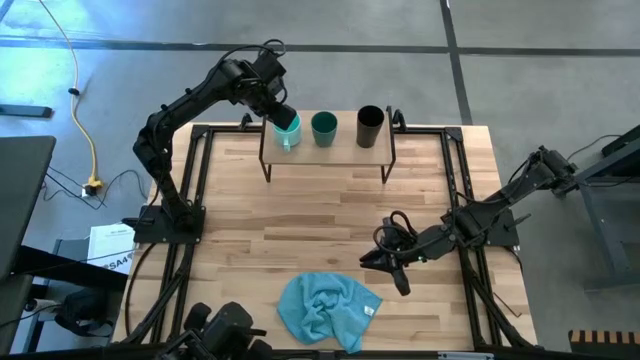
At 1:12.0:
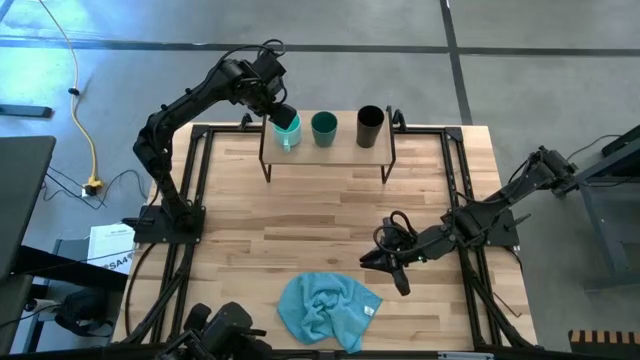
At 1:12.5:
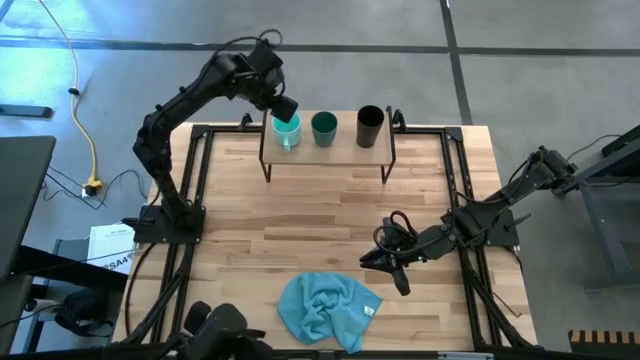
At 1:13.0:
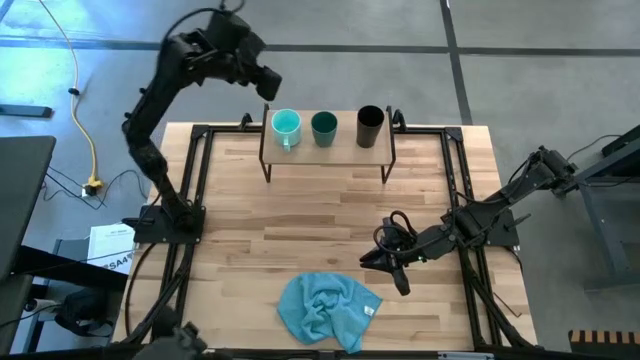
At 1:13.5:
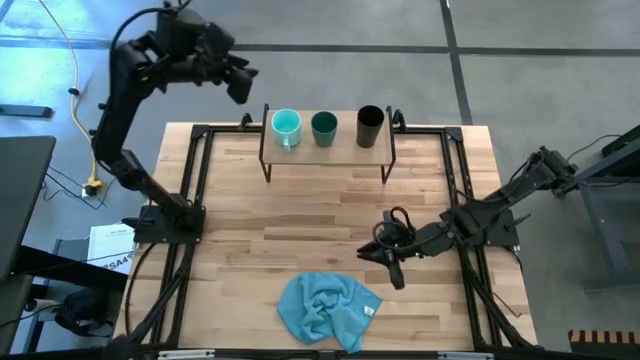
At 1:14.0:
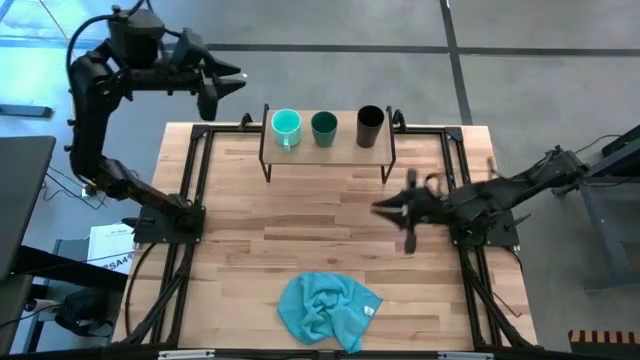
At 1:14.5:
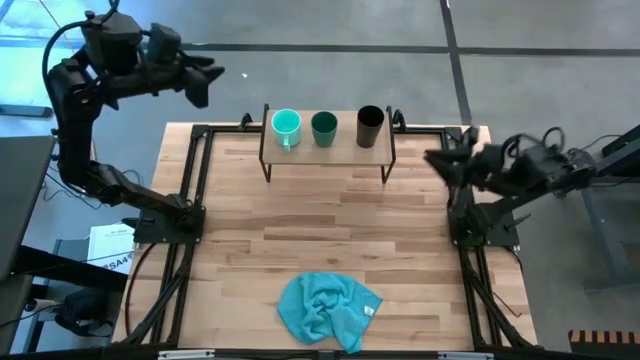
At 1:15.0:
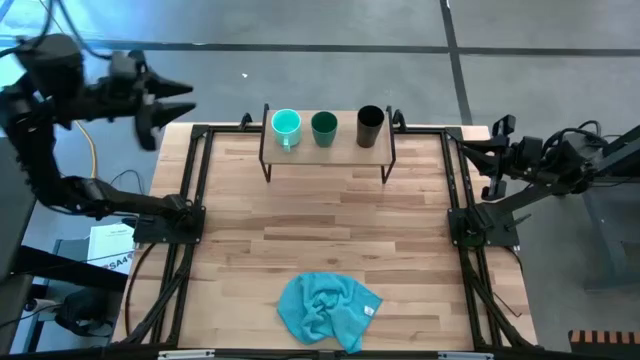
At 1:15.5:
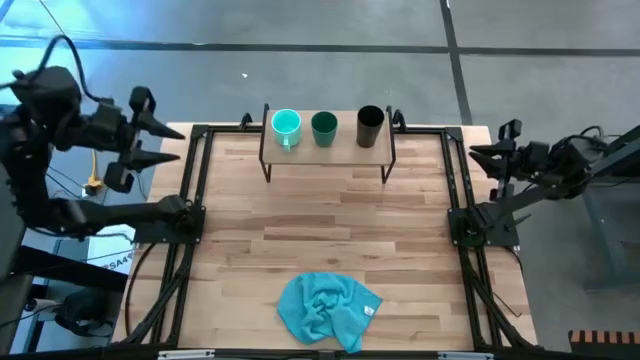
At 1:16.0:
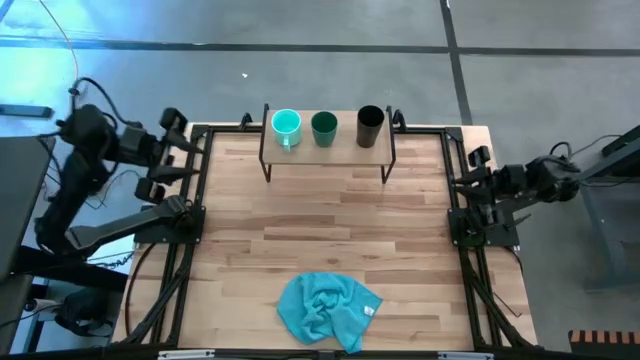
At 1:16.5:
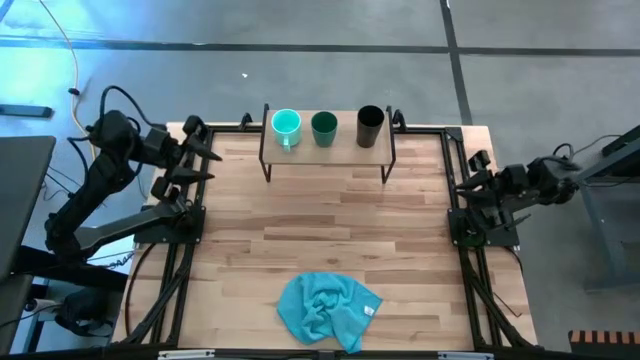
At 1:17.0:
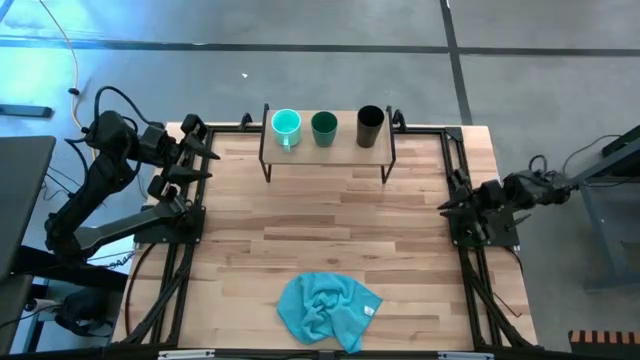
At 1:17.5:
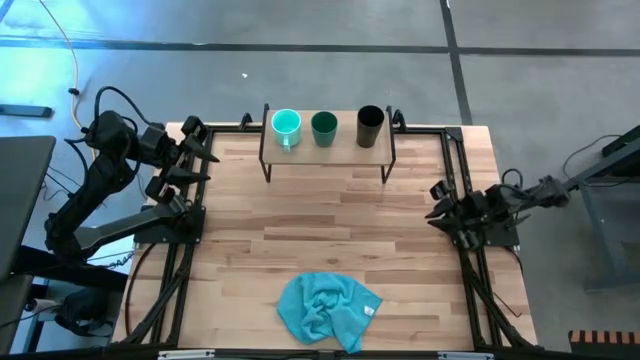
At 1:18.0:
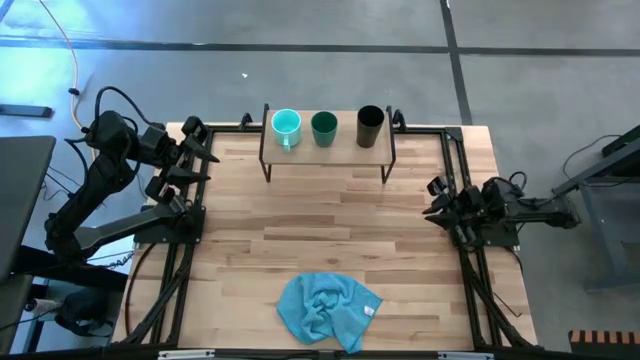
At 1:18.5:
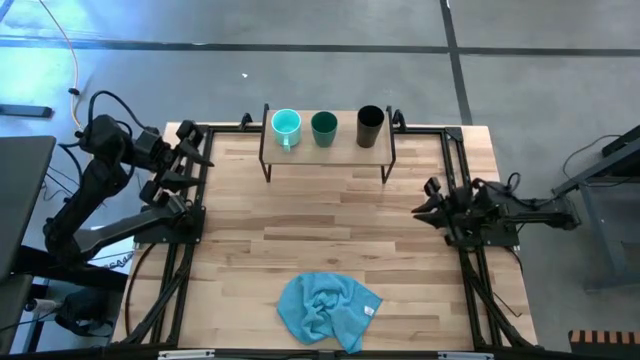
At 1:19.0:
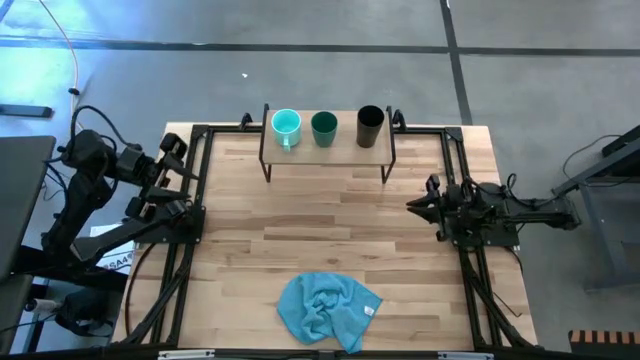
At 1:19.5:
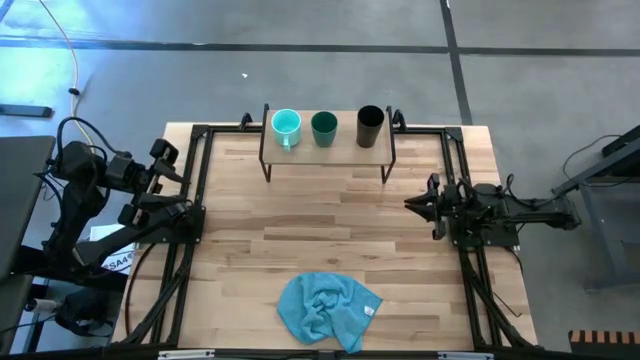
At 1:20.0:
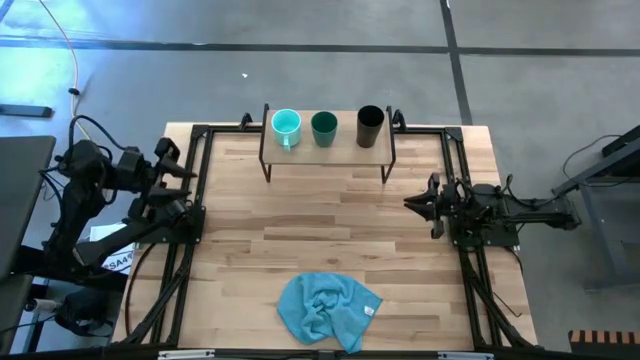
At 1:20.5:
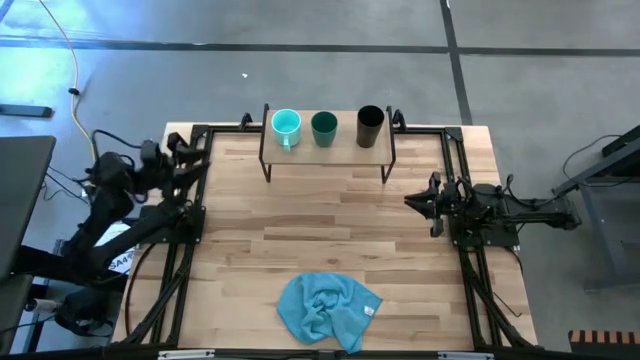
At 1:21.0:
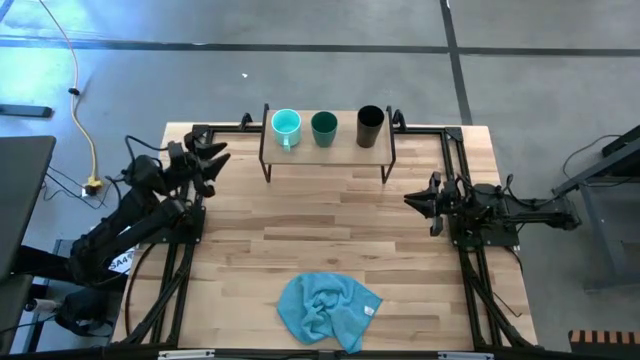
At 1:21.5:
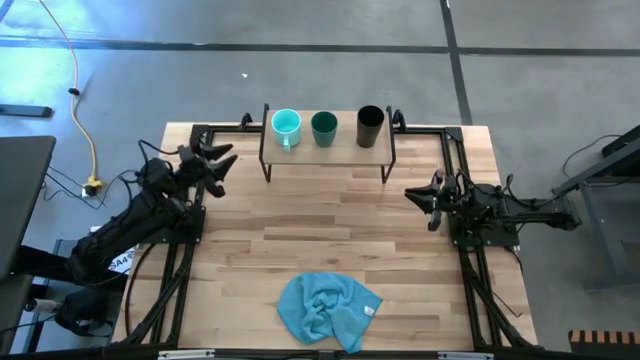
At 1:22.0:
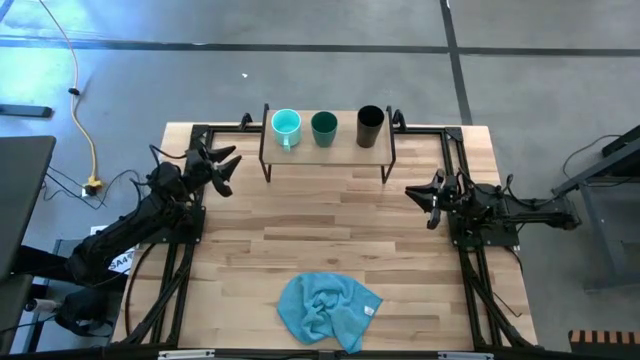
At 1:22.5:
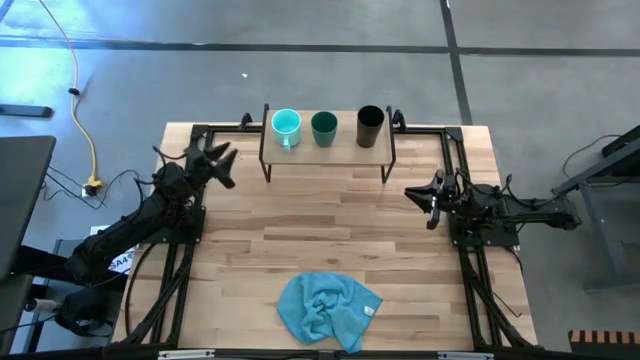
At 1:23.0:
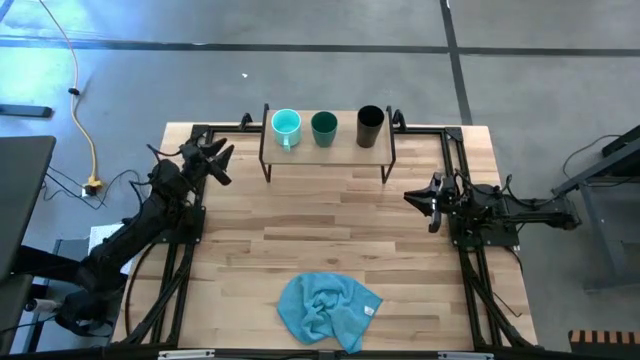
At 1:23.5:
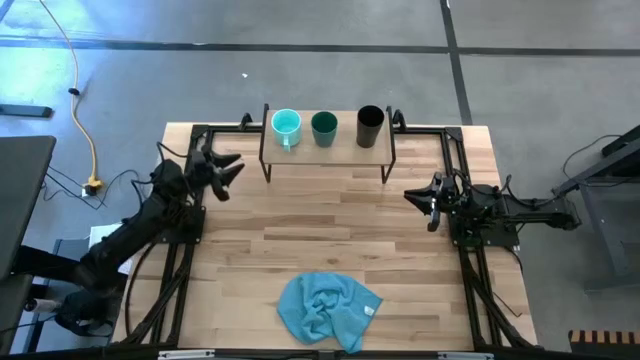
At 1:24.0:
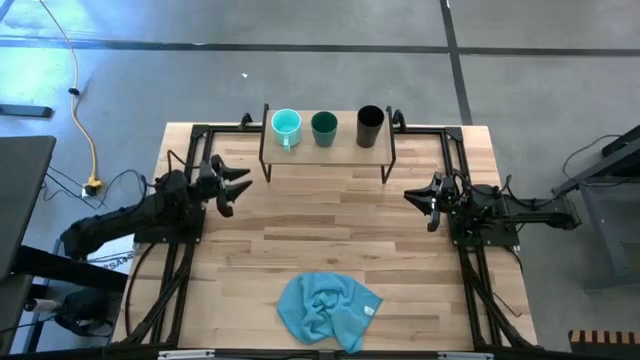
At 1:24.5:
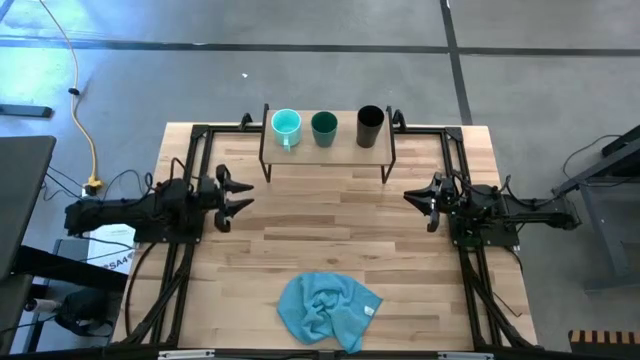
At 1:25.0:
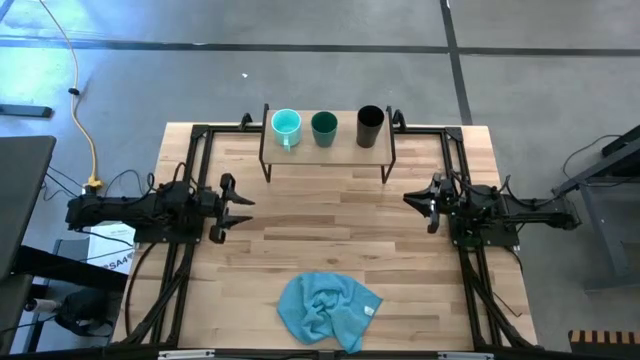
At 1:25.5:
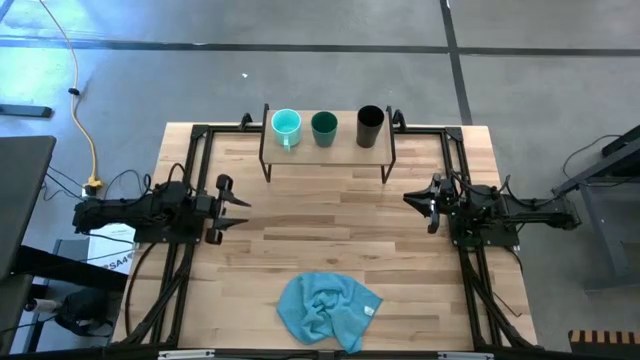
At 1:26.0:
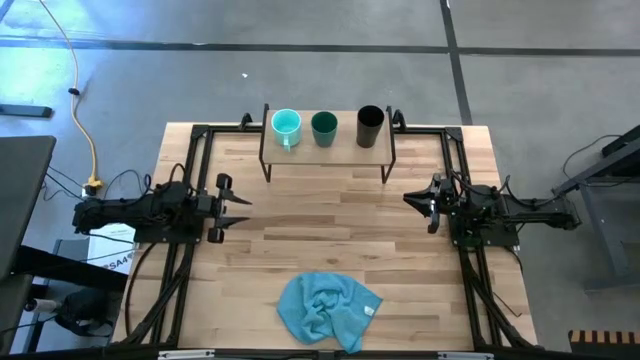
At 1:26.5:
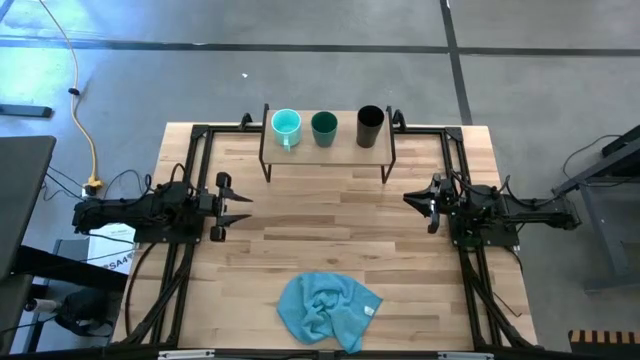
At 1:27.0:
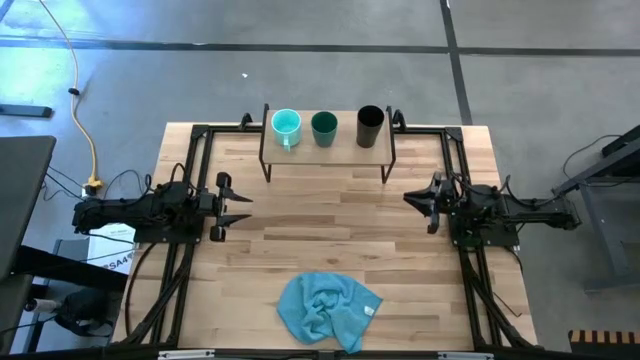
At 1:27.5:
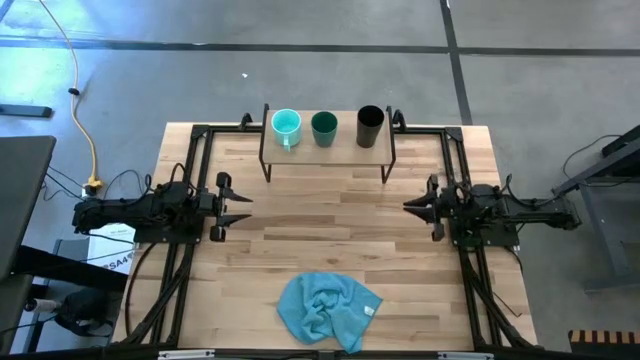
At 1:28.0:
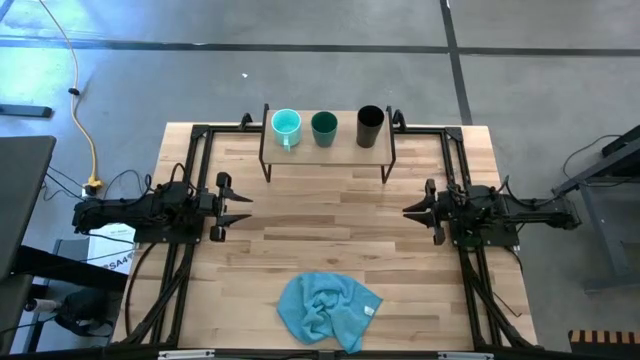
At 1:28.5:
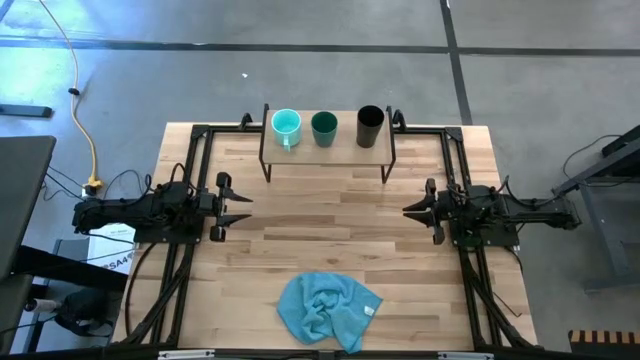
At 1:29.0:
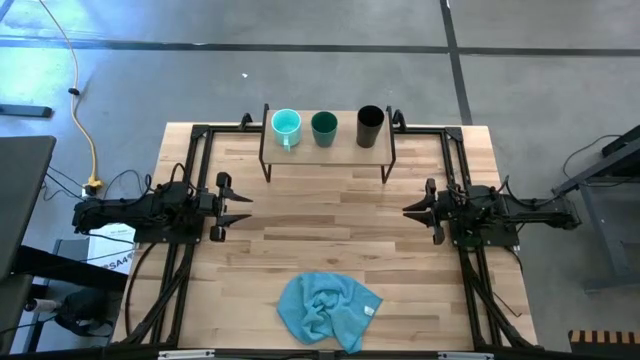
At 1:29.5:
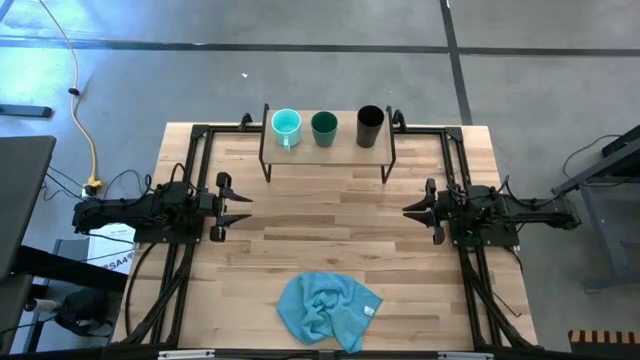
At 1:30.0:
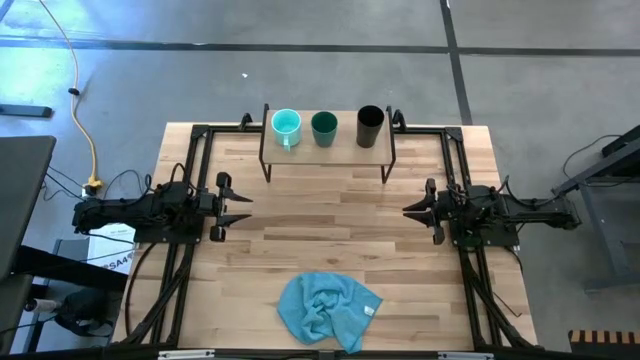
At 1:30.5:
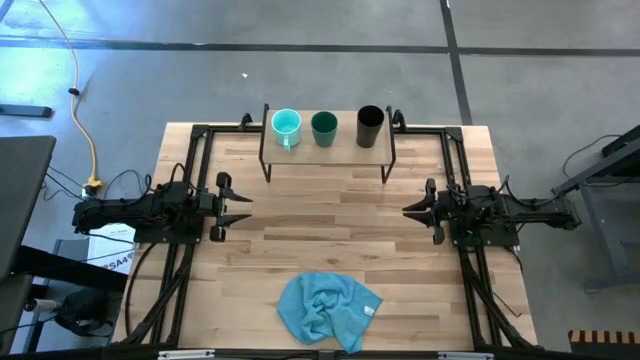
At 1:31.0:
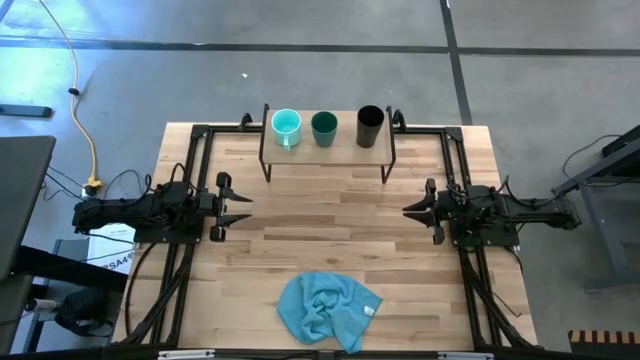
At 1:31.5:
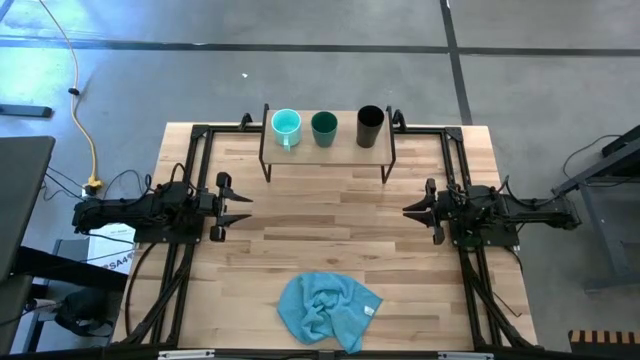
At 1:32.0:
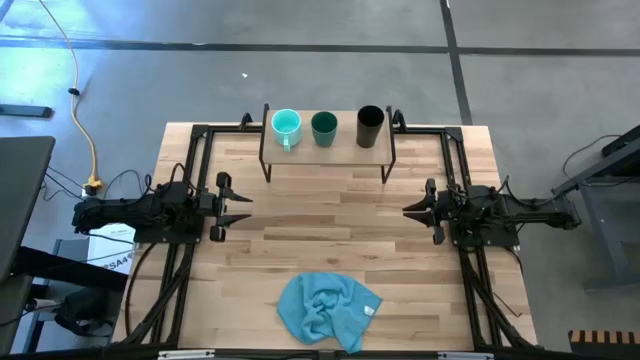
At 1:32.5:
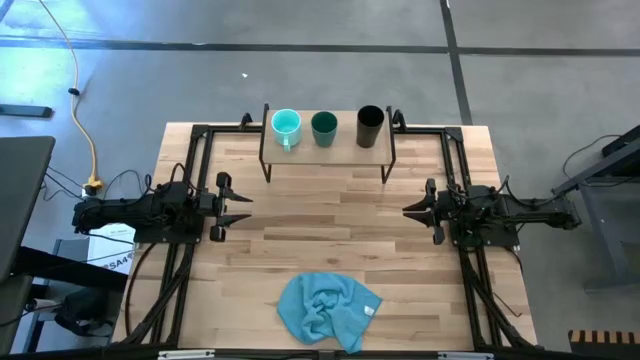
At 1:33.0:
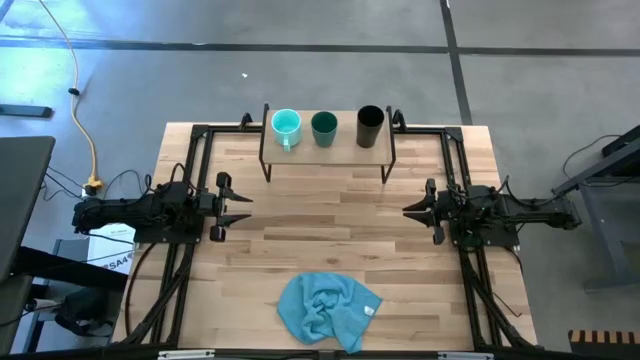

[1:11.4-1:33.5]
Task: Stack small to large cups/mugs on shelf
Return to Home Position
